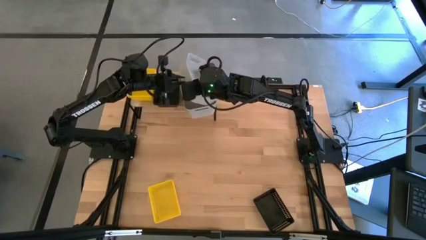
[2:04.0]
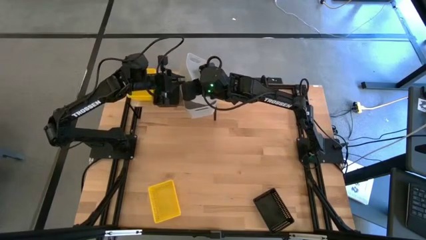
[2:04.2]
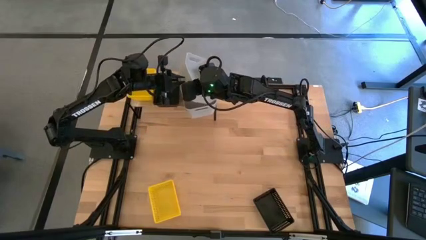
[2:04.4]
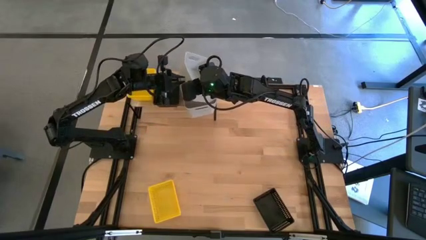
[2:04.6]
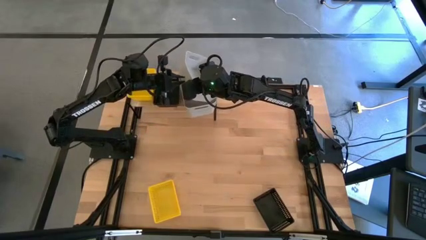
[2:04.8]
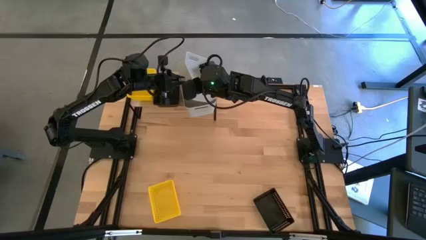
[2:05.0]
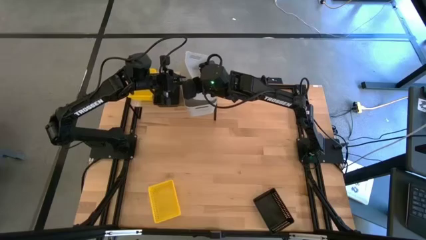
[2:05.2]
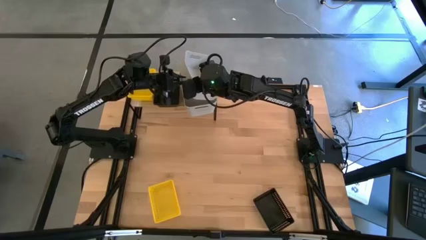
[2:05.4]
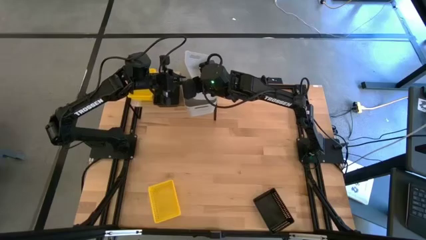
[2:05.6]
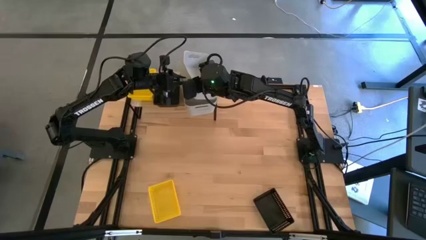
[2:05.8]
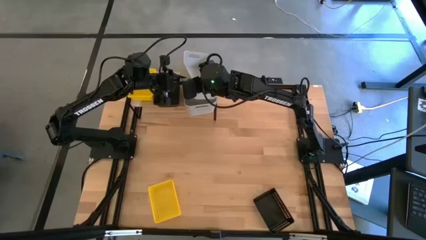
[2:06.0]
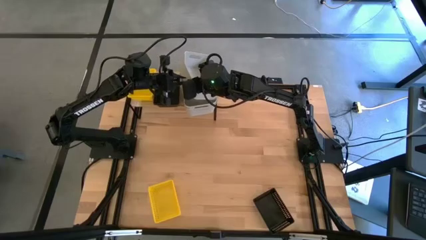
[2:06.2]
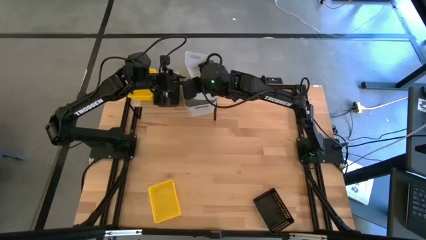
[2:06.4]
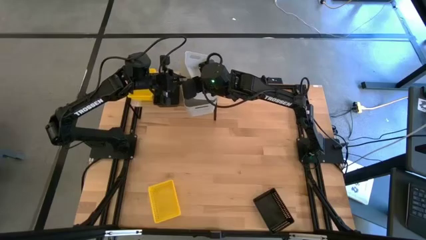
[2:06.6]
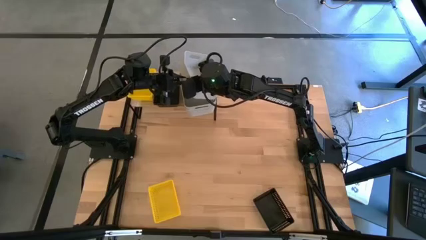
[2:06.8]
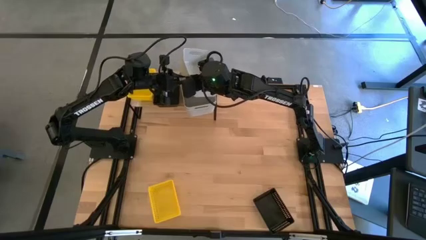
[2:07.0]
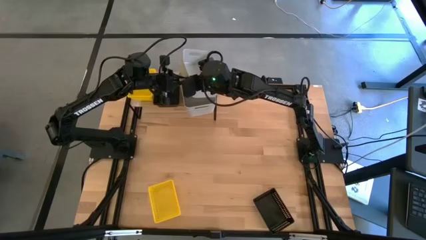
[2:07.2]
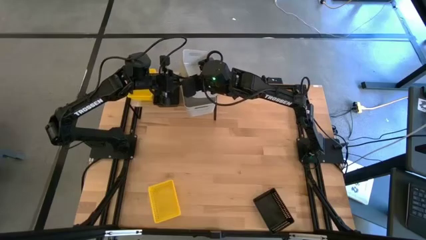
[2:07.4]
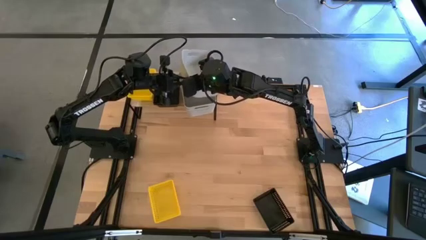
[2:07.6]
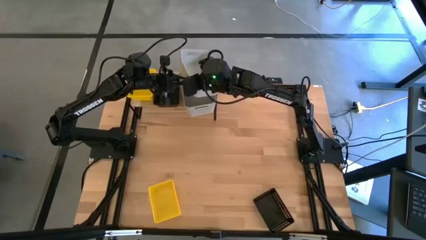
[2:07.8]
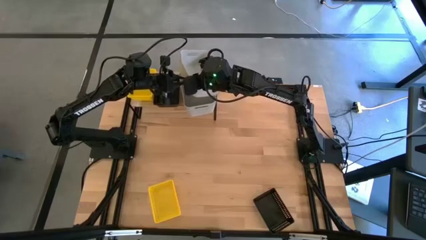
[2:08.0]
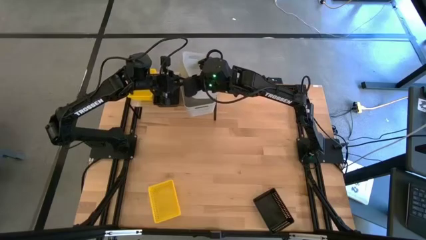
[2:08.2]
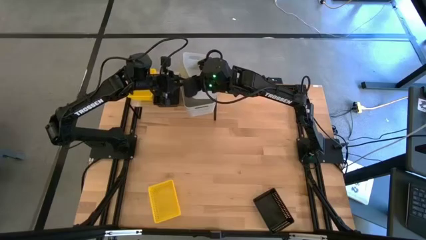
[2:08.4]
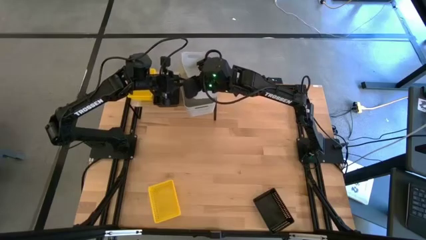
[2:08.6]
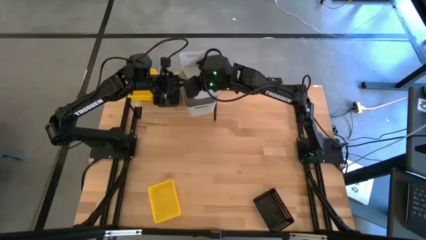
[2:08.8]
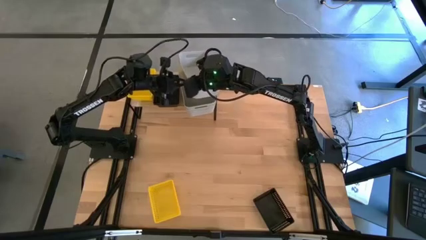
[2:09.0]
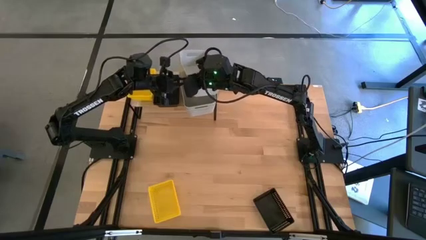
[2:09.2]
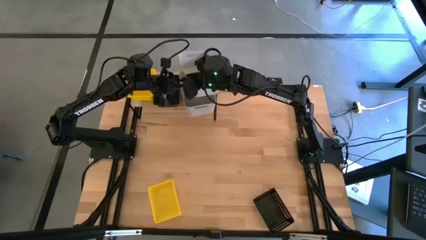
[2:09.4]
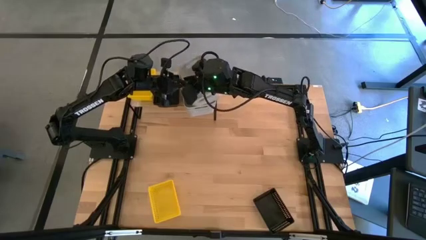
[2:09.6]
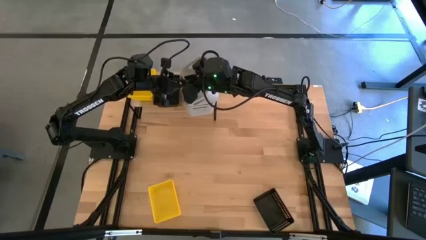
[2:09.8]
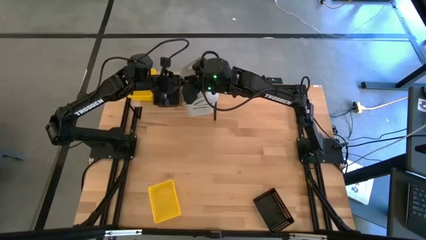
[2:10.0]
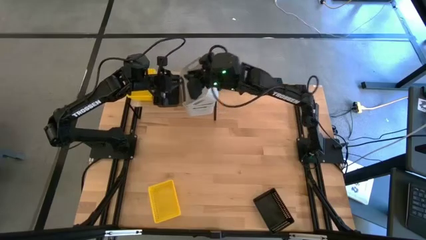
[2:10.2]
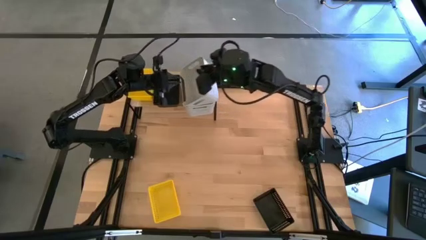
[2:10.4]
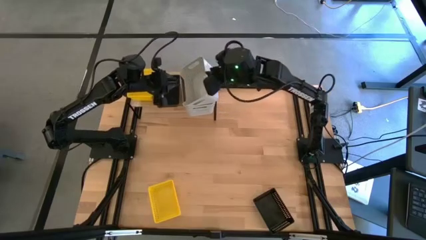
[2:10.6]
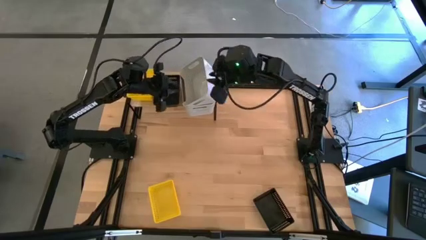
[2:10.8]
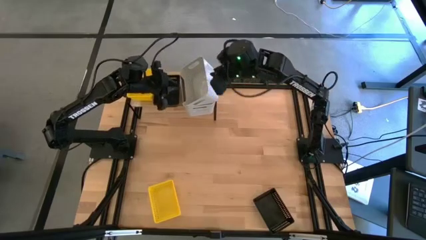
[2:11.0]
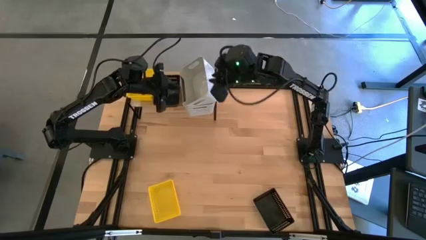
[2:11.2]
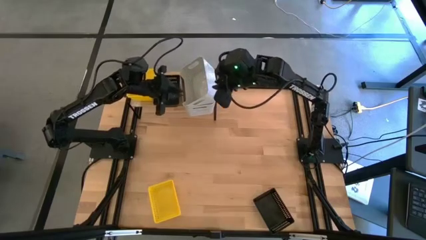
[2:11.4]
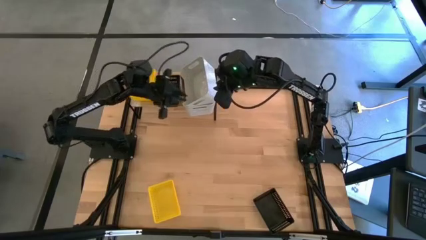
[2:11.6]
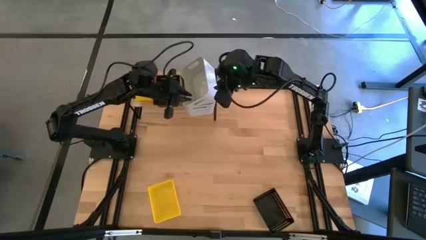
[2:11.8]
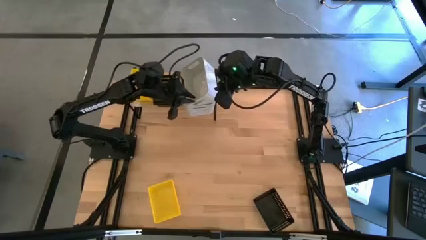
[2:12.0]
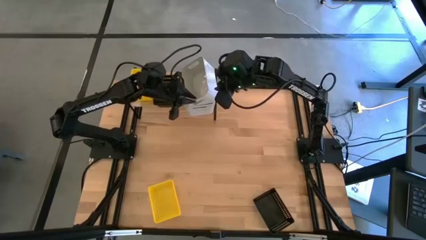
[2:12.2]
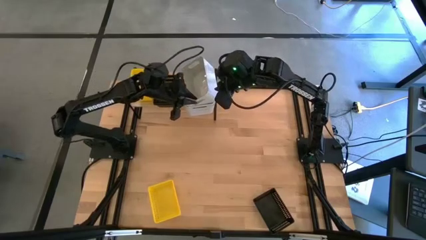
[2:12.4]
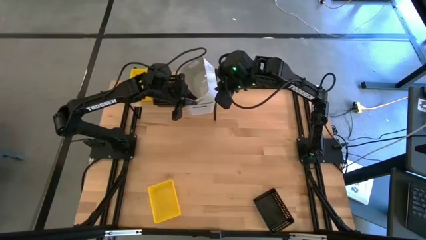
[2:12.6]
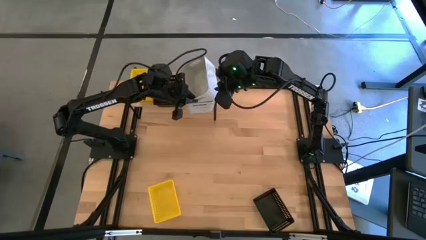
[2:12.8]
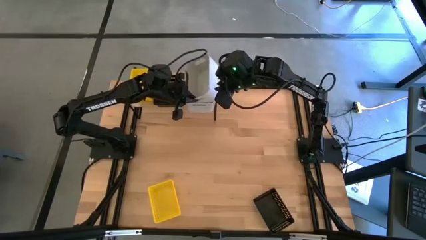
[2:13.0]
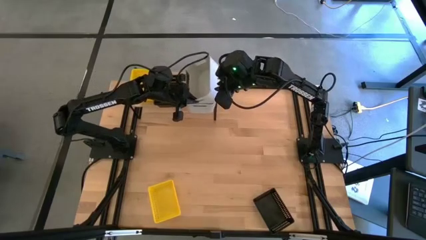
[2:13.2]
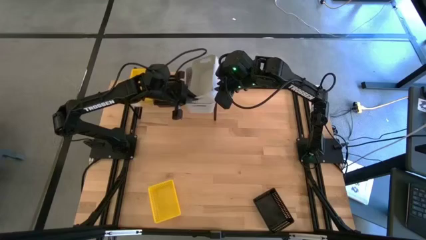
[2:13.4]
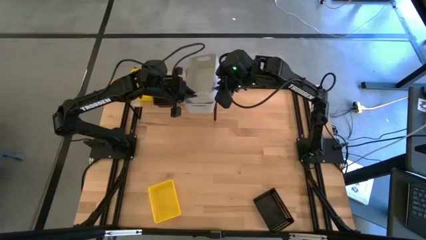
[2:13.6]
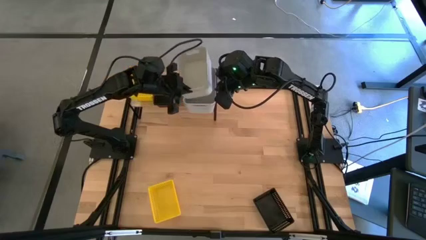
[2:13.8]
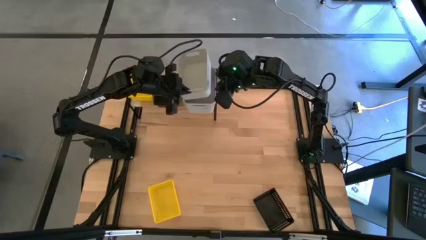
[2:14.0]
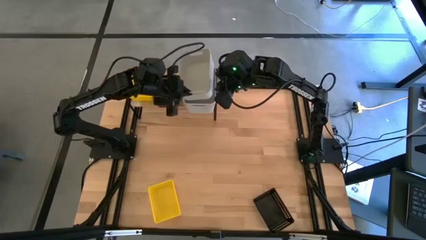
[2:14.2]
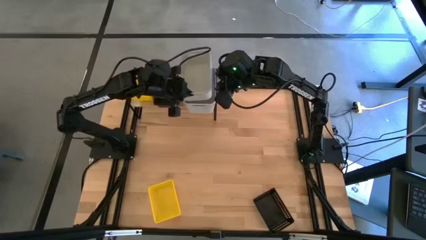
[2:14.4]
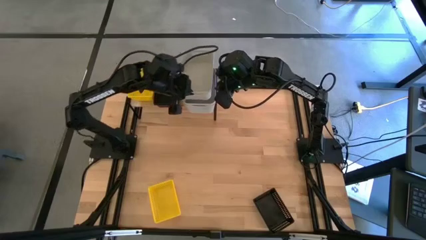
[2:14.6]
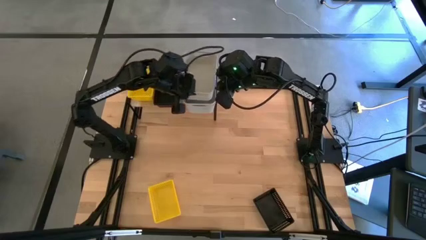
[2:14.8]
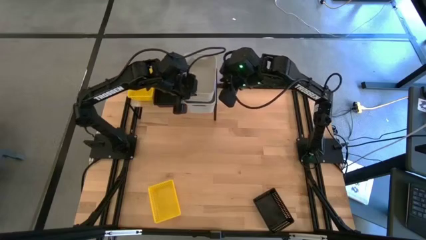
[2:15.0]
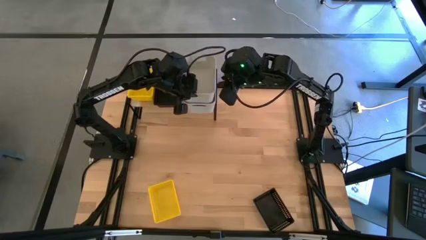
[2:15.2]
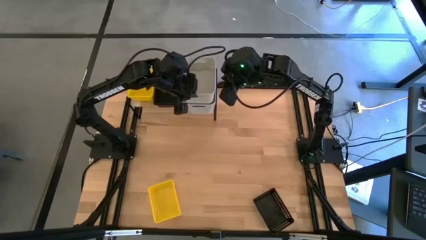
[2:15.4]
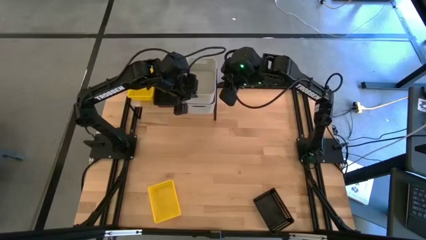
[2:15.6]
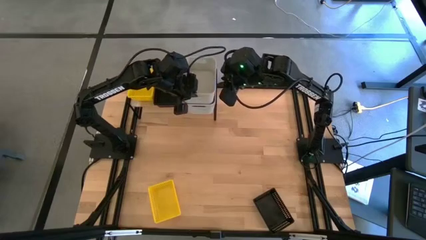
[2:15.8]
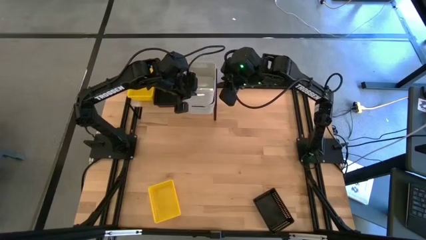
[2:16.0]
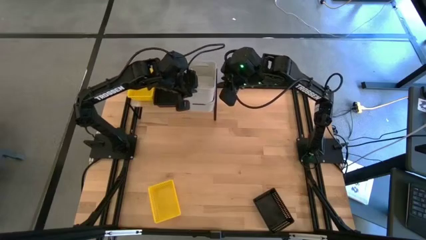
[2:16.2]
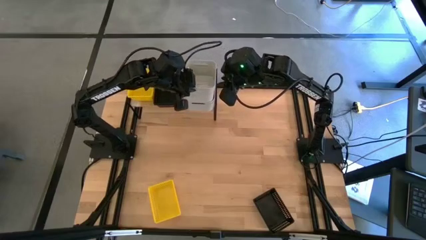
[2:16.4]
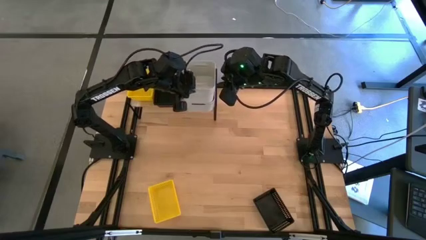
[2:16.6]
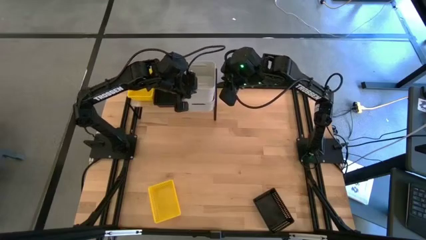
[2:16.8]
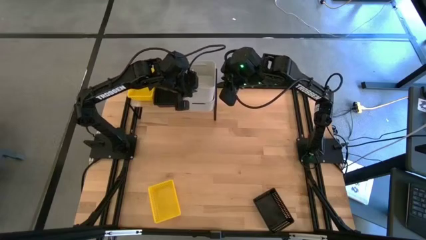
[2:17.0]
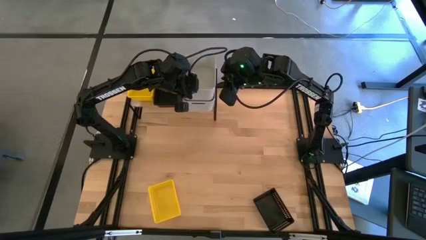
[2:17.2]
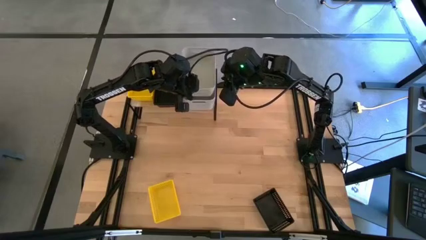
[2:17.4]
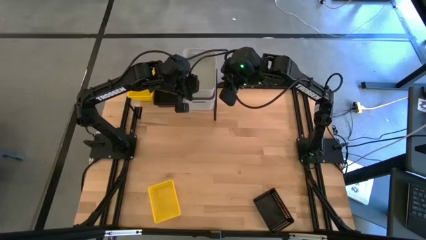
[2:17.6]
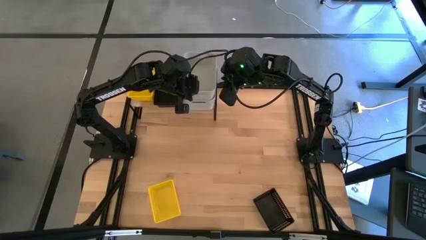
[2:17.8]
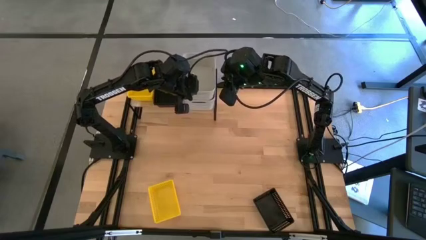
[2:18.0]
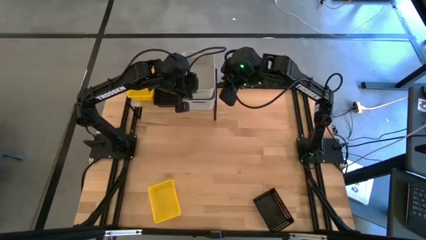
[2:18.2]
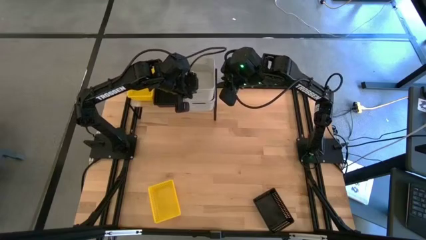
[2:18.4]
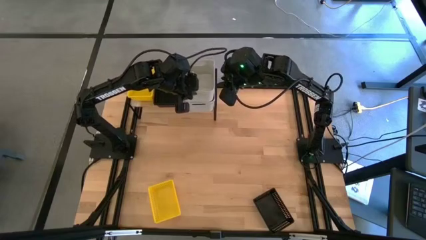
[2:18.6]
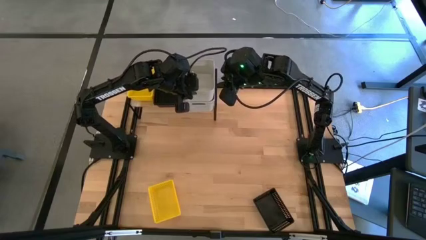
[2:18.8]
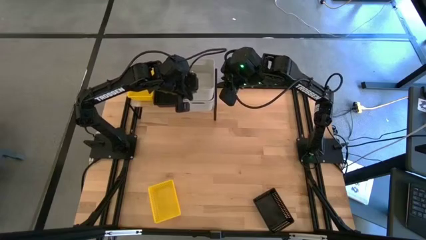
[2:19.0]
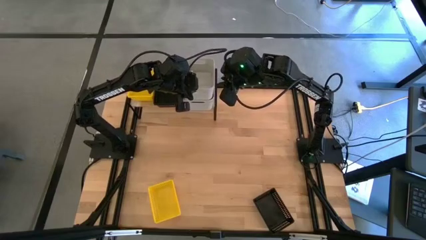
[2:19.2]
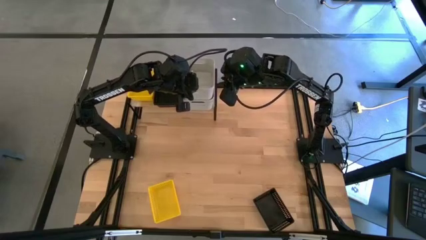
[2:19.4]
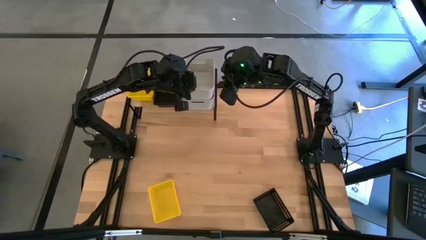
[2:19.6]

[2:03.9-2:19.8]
Task: Stack baskets on shelf by color
Stack the gray bin on top of the other gray bin on the shelf
